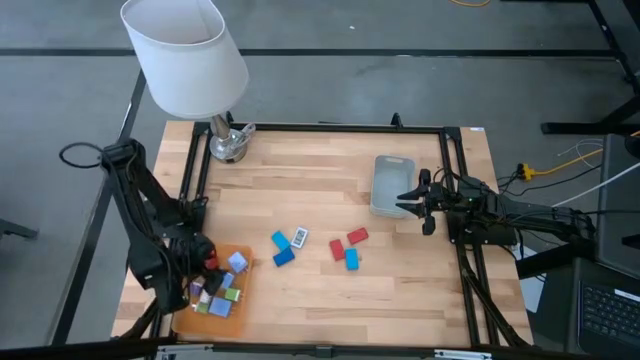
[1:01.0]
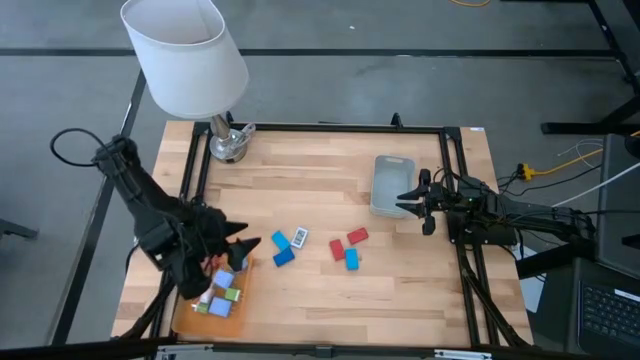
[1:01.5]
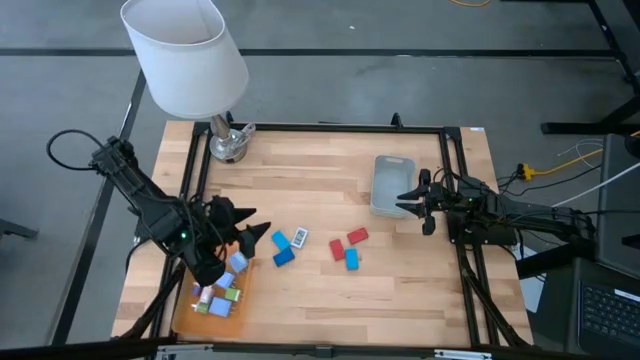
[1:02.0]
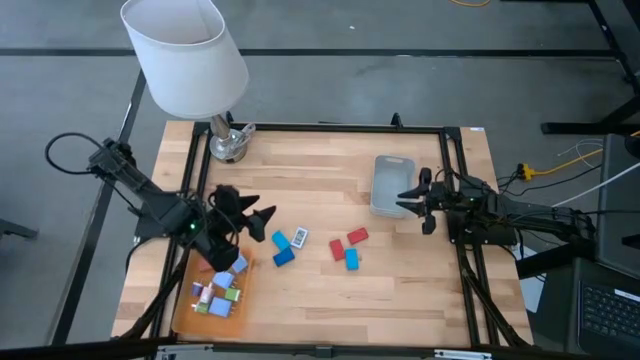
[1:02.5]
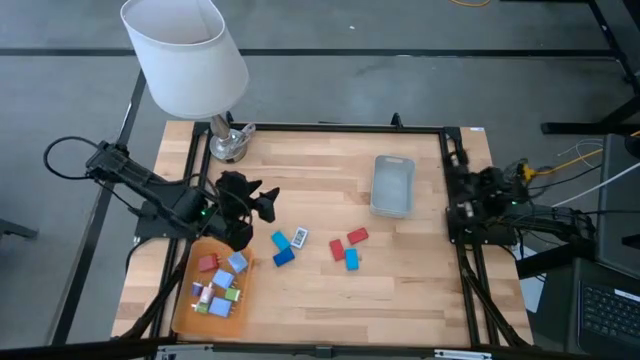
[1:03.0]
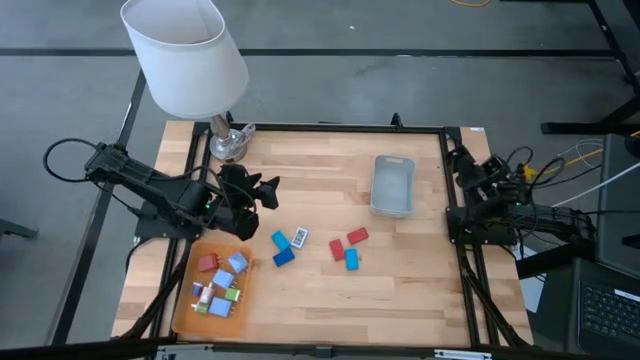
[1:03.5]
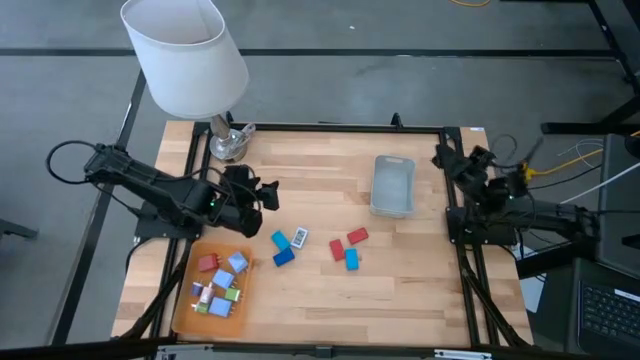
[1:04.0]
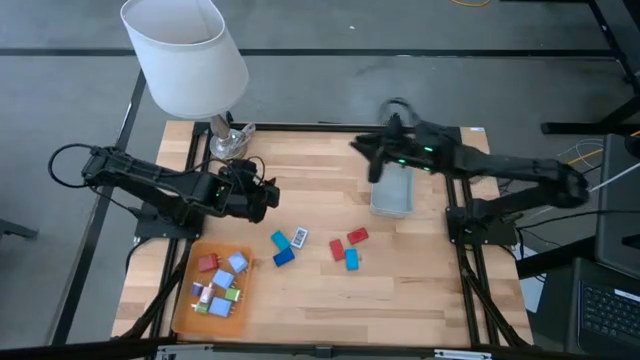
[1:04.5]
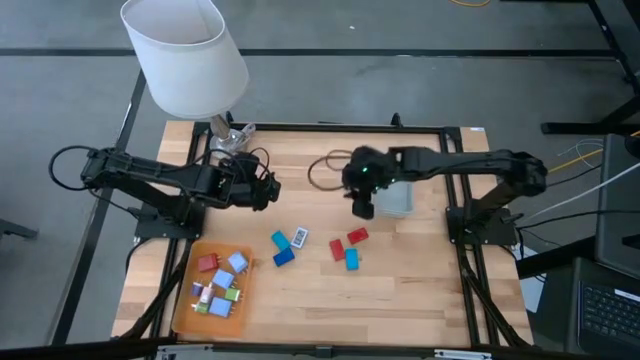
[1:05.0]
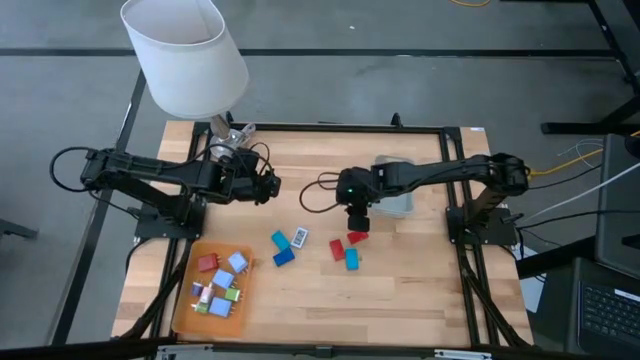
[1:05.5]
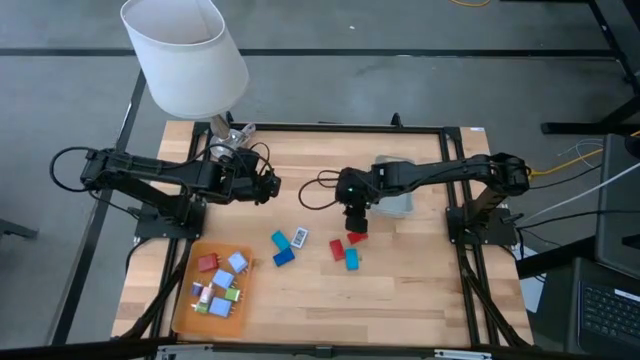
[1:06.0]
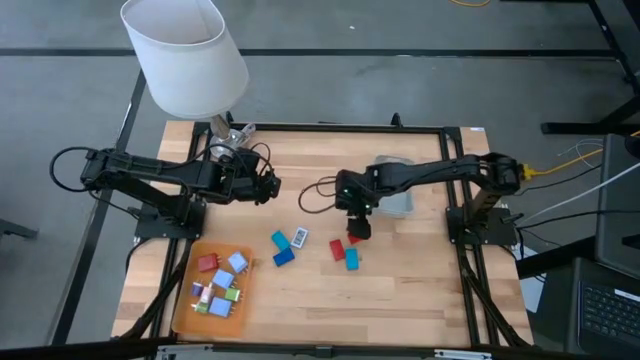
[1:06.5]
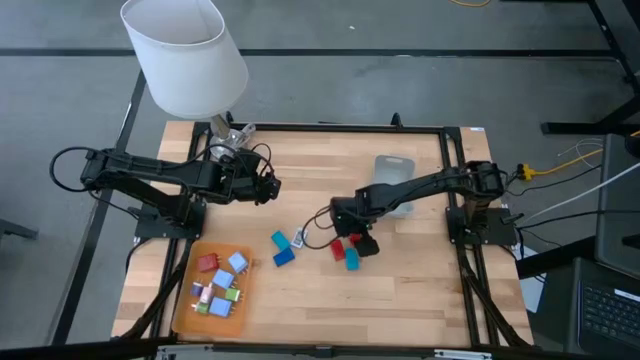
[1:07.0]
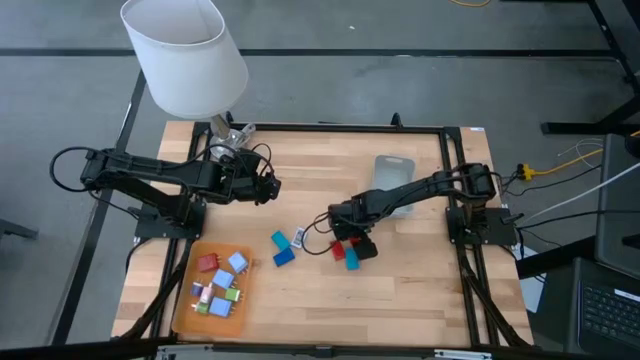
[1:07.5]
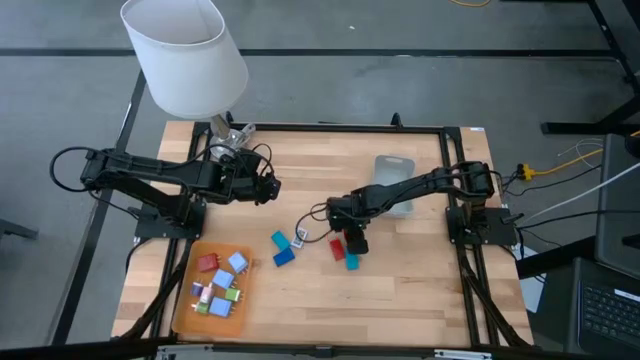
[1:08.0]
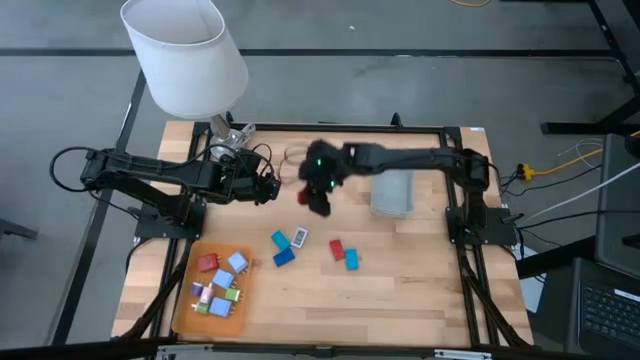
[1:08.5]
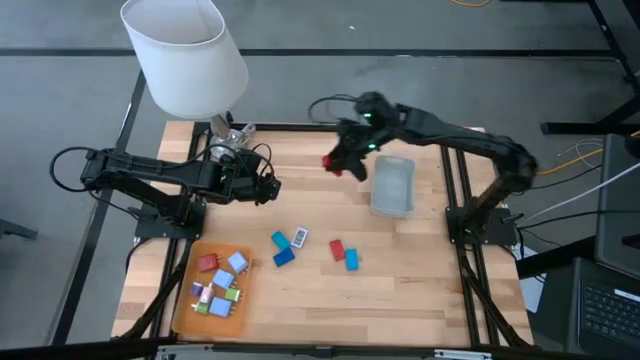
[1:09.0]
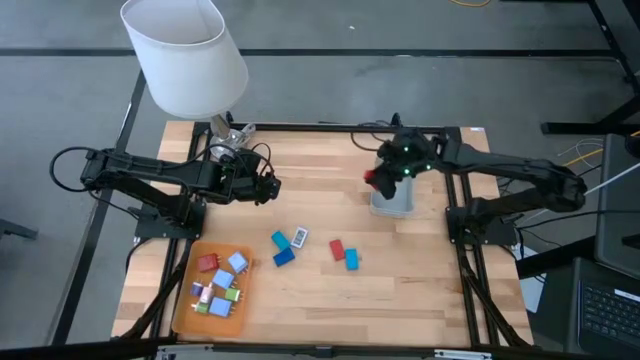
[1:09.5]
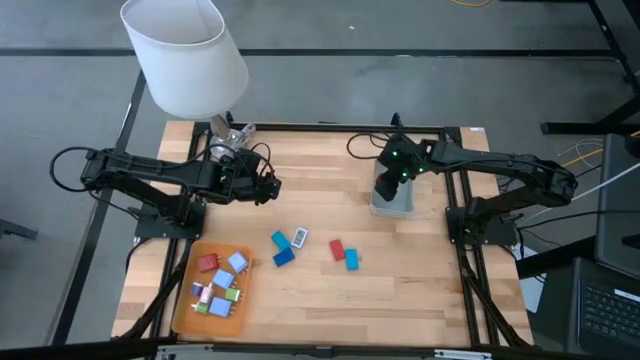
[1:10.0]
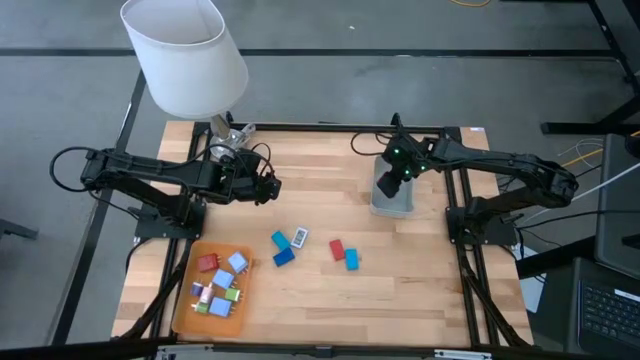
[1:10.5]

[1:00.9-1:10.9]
Task: Pick & Place Office items
Put the top right red digital timer into the grey bin

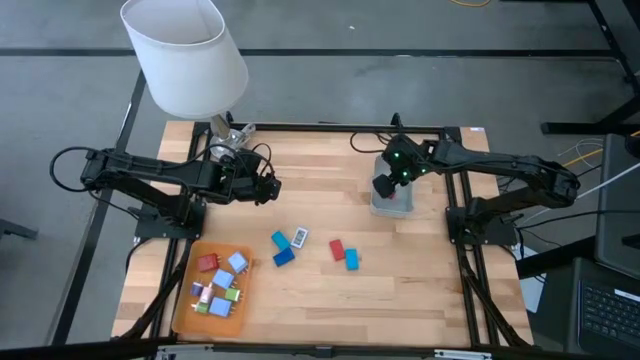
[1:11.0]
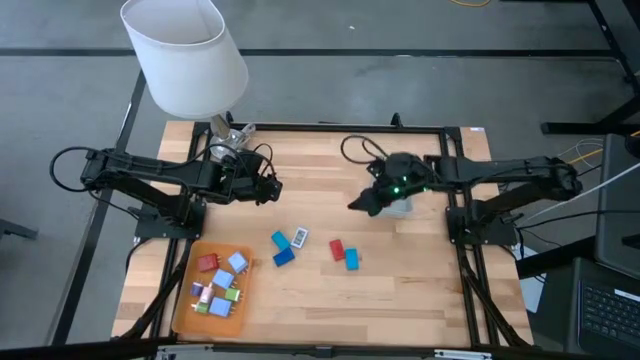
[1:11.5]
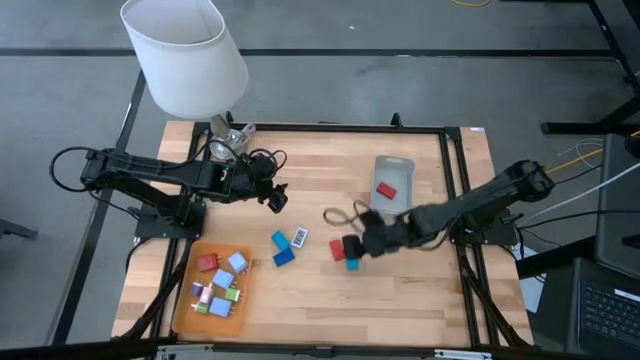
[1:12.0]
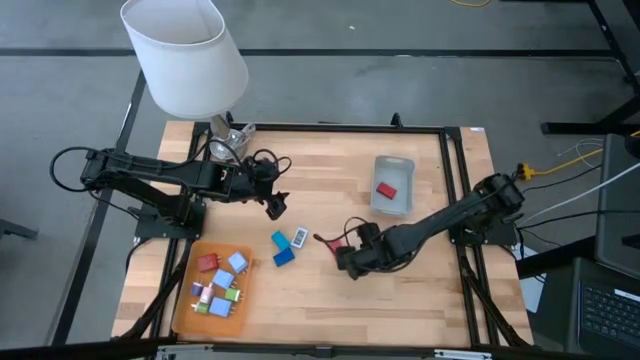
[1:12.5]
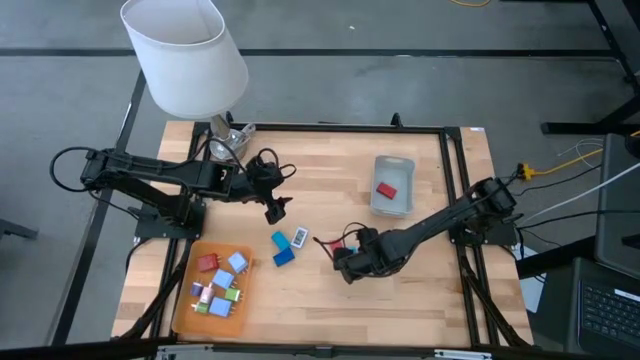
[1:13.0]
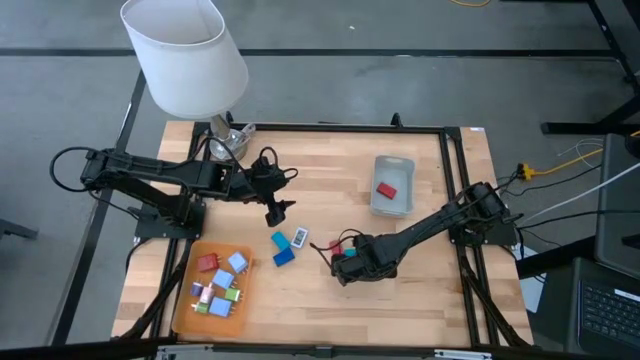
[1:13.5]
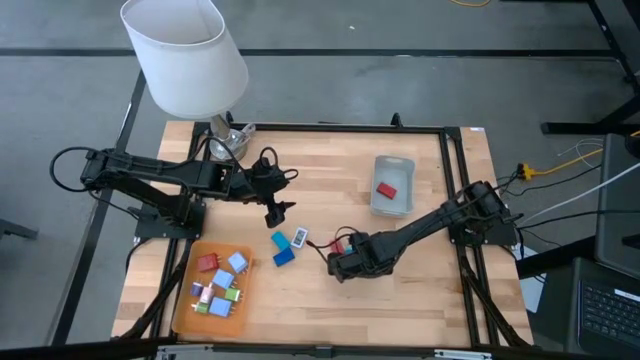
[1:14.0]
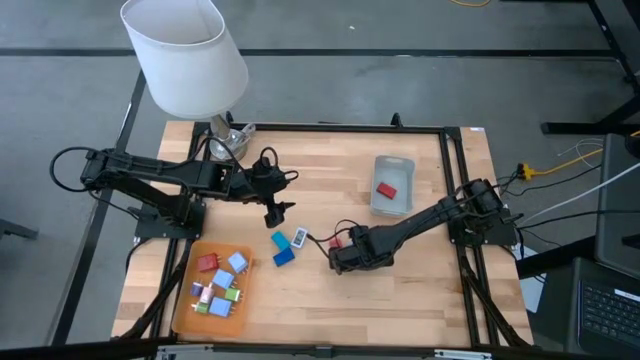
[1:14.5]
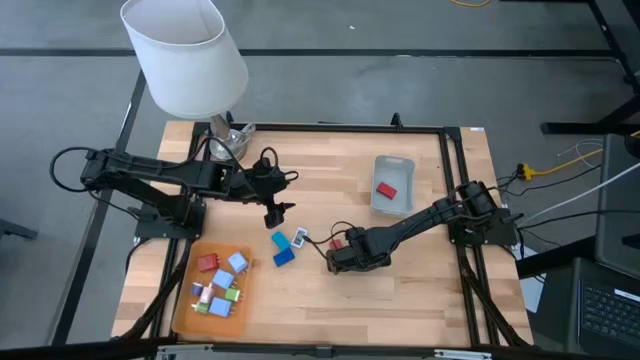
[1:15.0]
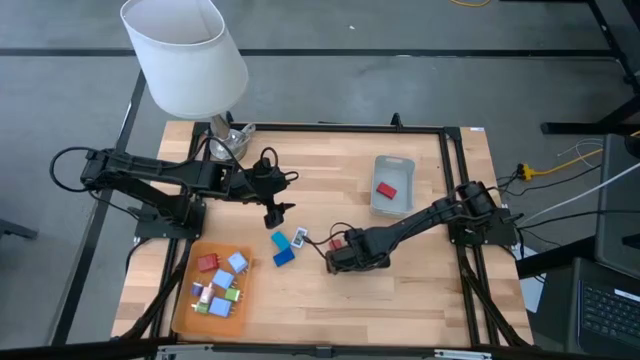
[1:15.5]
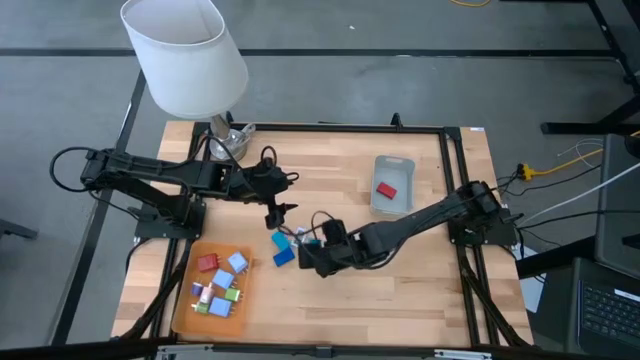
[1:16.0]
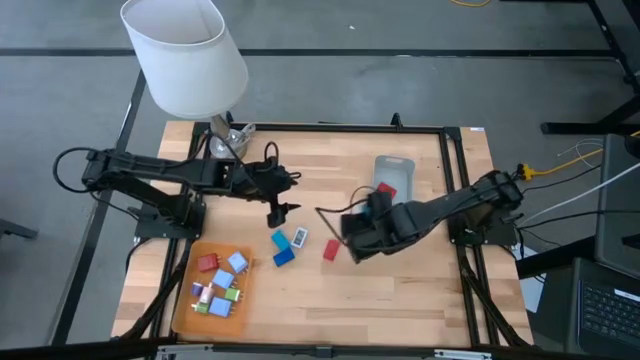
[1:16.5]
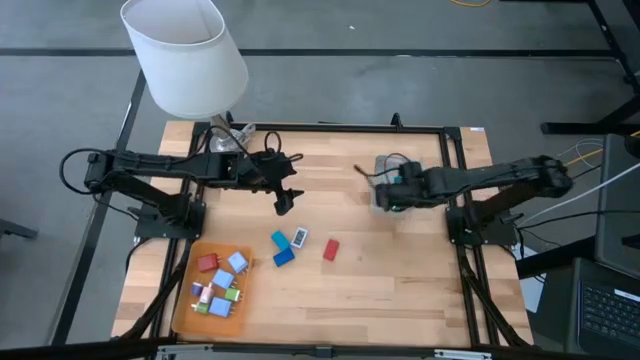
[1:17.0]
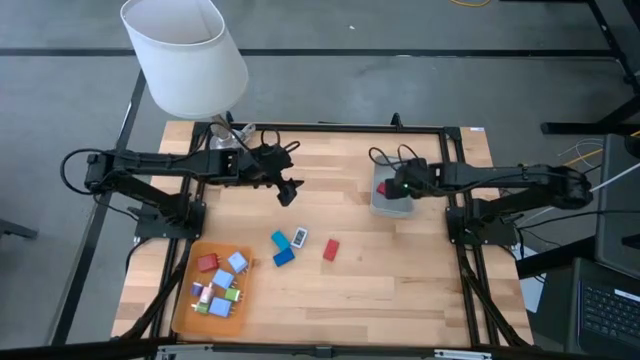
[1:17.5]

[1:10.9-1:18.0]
Put the left blue digital timer into the grey bin

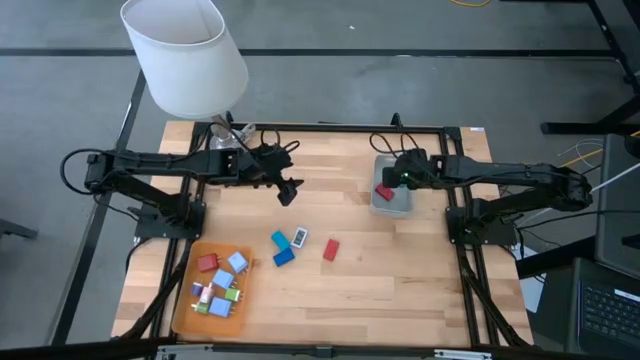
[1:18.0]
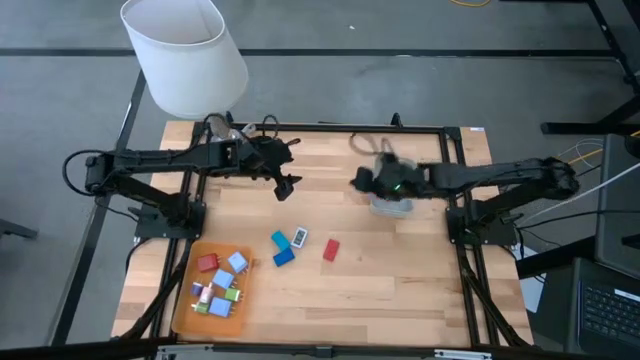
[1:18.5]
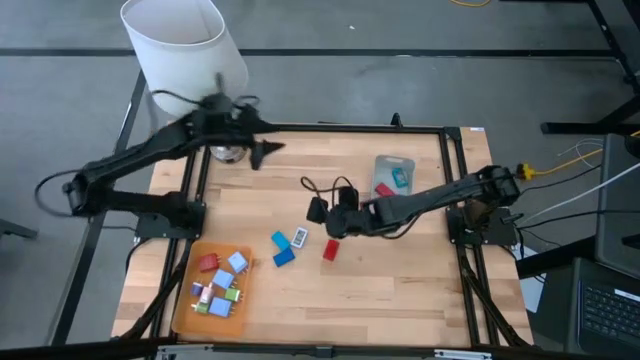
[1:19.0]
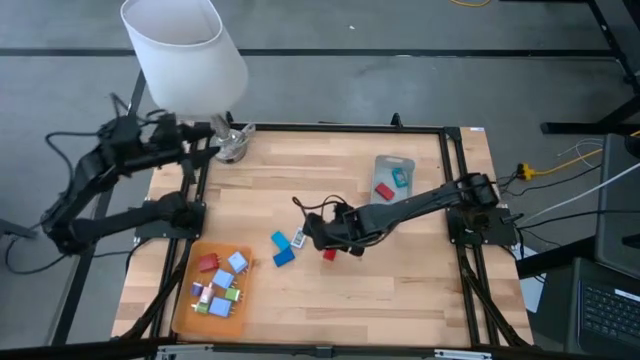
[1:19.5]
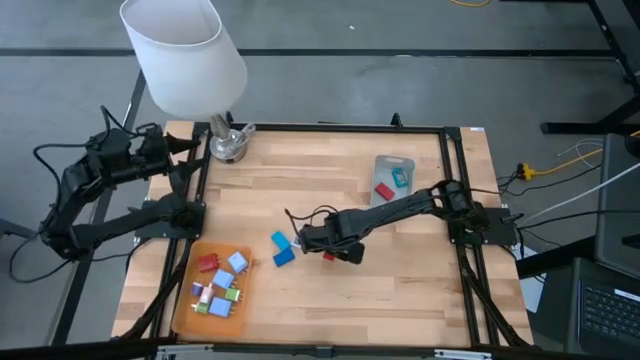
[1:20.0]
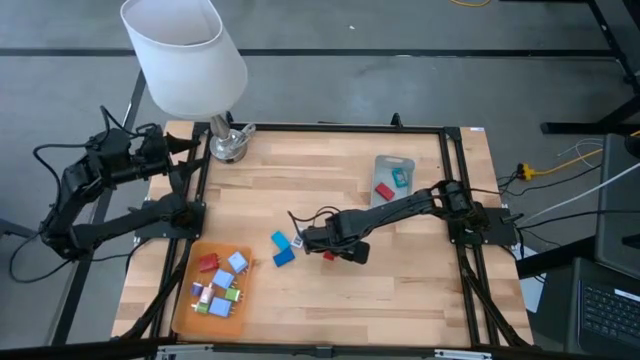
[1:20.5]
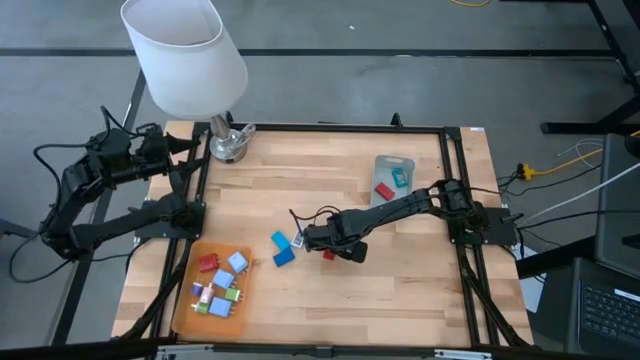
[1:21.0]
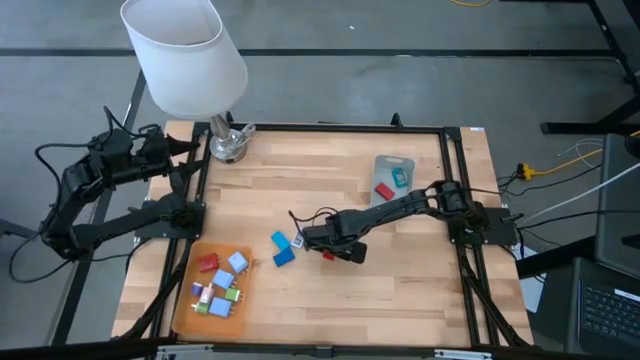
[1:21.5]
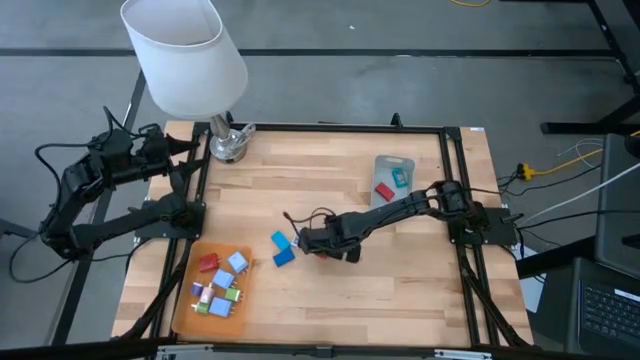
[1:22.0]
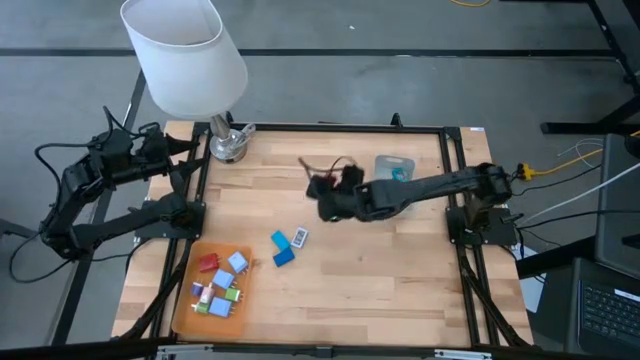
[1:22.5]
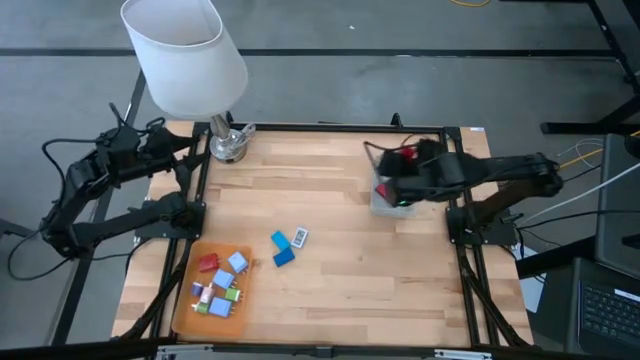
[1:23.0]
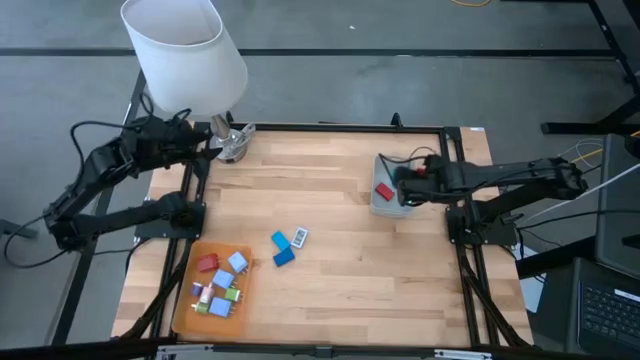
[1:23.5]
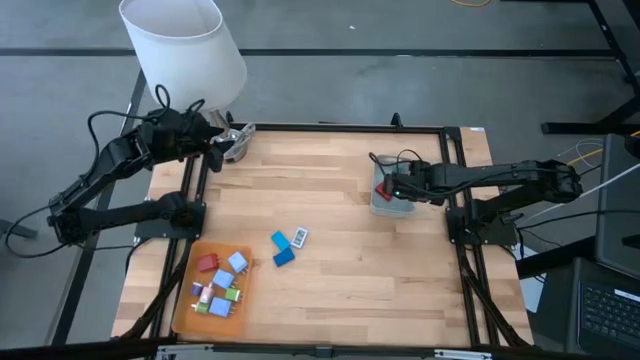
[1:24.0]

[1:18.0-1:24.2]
Put the red digital timer into the grey bin
